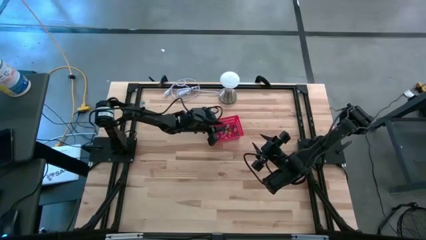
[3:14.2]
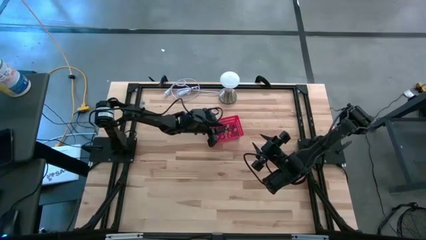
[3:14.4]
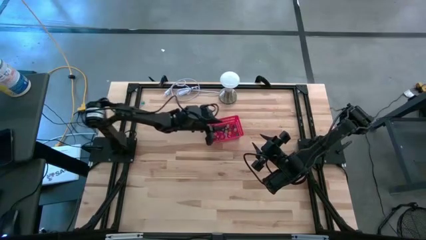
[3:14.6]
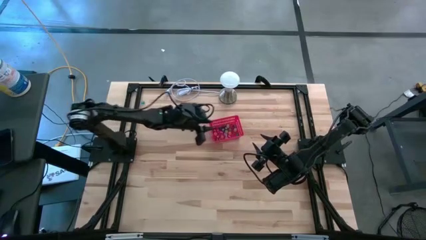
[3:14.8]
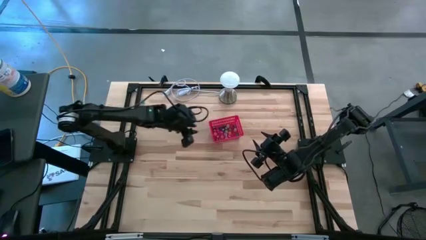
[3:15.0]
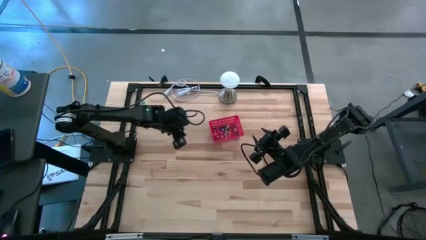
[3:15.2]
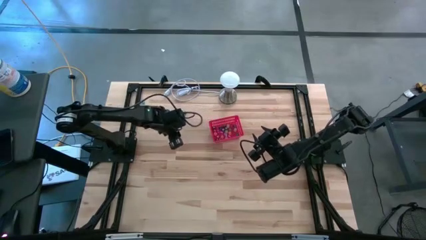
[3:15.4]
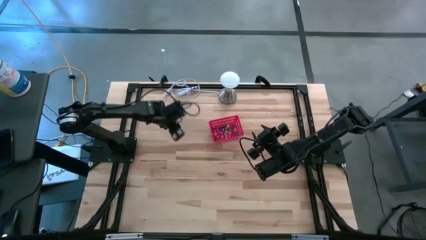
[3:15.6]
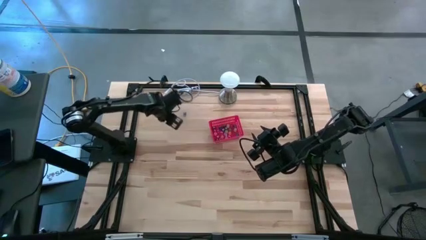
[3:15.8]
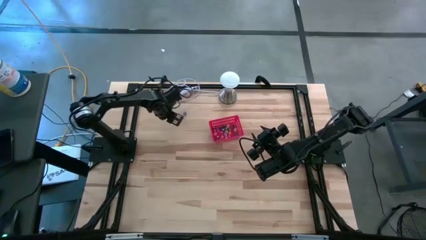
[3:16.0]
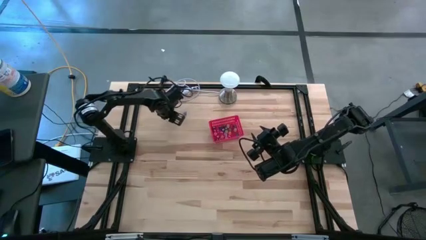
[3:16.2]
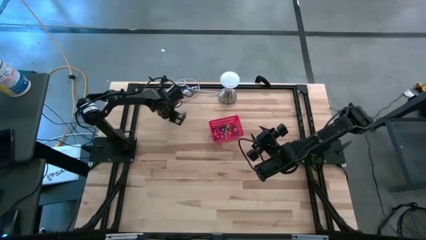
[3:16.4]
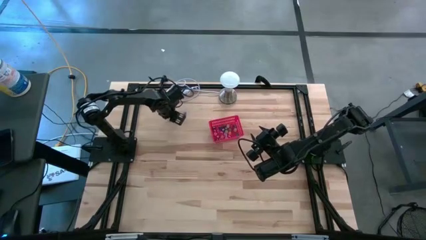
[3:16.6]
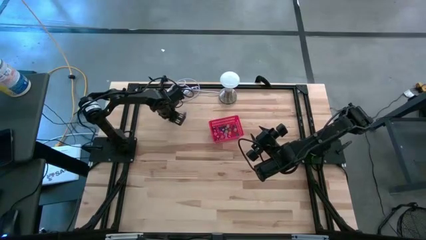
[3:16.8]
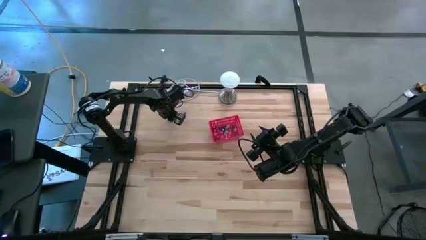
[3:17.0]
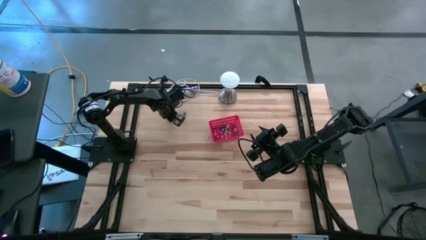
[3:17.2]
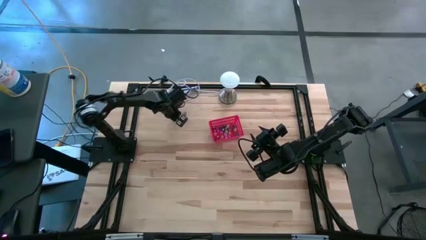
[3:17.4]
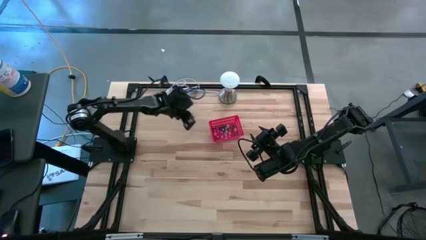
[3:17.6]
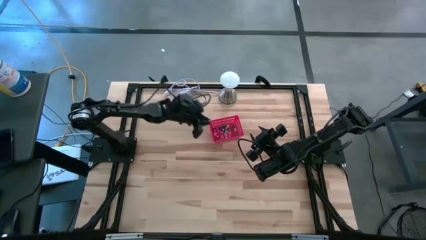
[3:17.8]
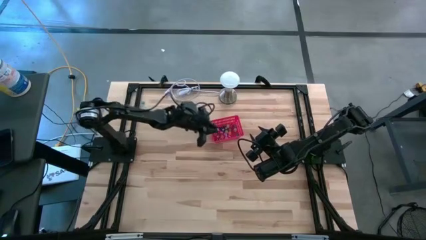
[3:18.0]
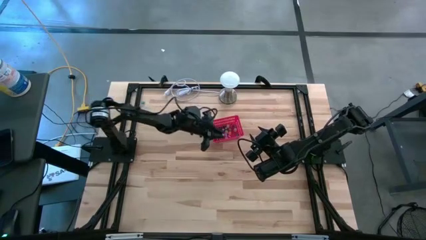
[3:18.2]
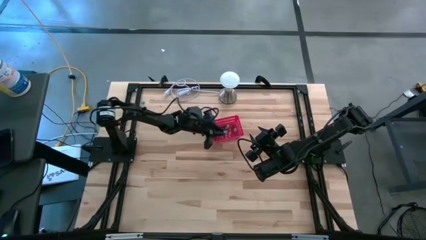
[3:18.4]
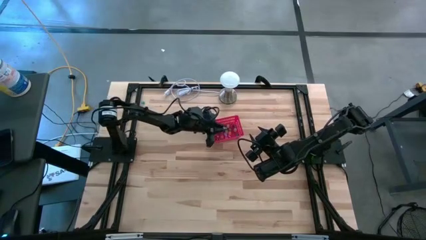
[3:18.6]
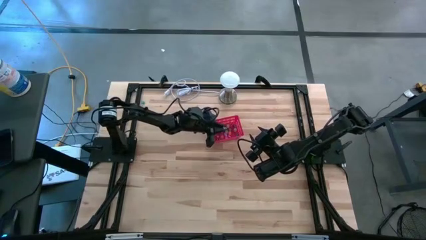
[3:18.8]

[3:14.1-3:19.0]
Task: Pick & Place Dice
Put the left blue dice into the bin

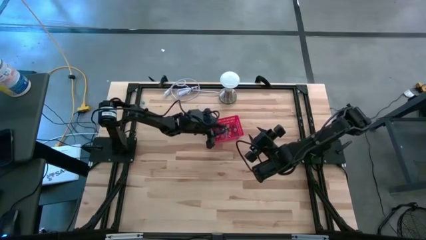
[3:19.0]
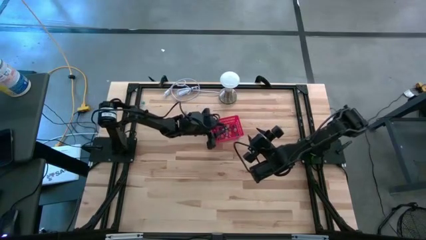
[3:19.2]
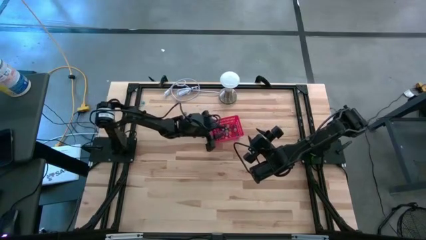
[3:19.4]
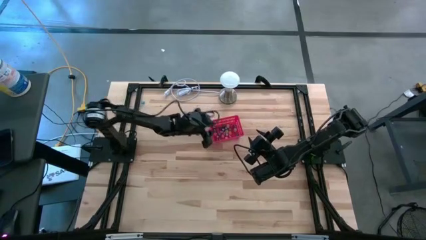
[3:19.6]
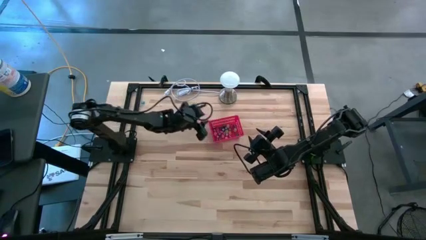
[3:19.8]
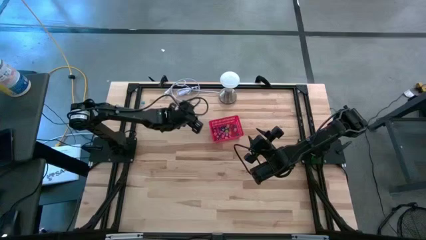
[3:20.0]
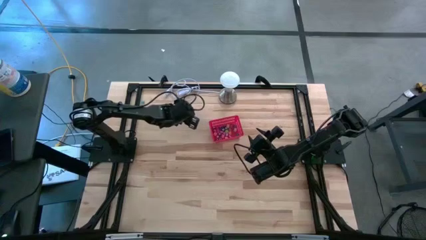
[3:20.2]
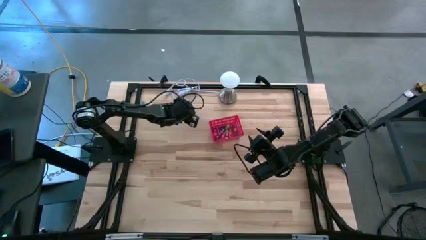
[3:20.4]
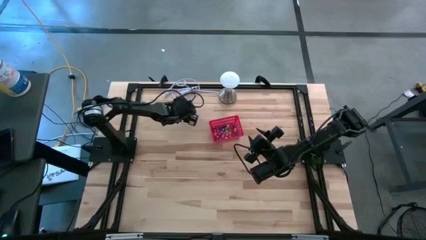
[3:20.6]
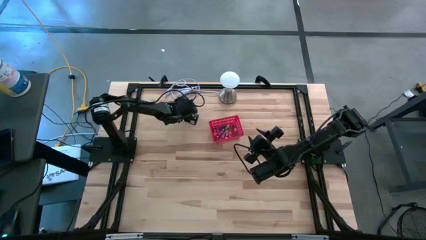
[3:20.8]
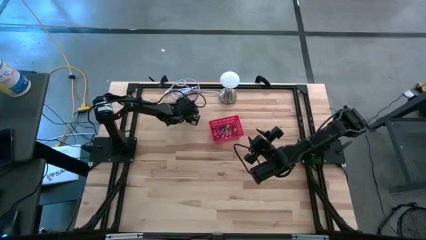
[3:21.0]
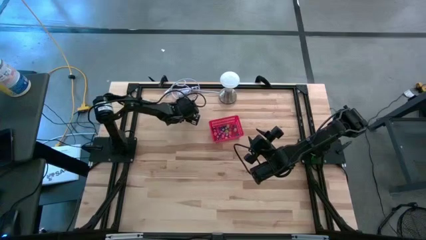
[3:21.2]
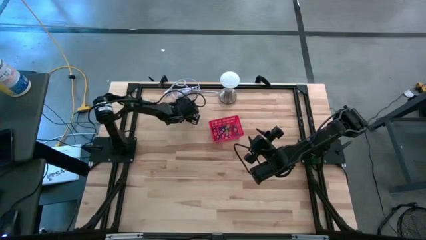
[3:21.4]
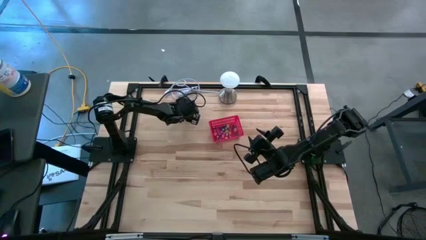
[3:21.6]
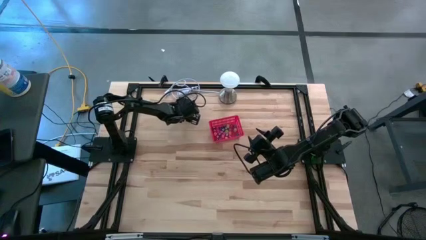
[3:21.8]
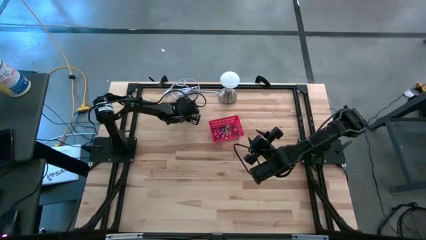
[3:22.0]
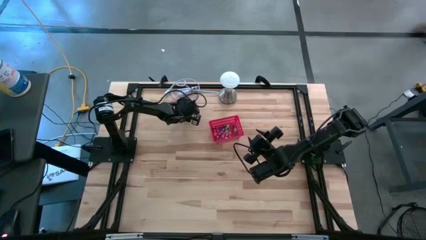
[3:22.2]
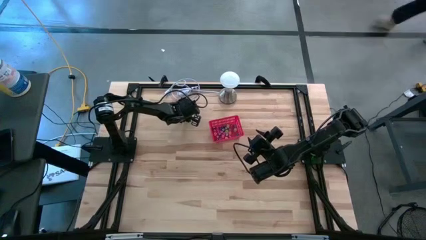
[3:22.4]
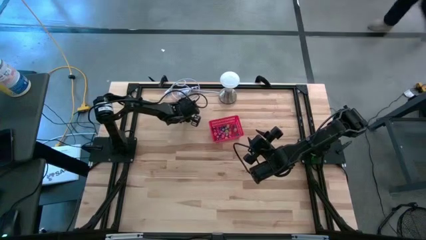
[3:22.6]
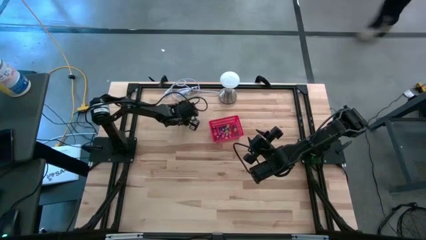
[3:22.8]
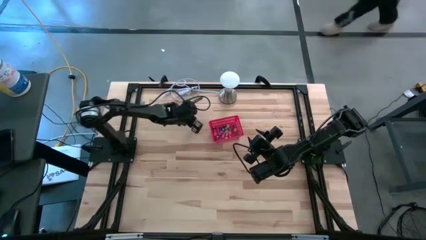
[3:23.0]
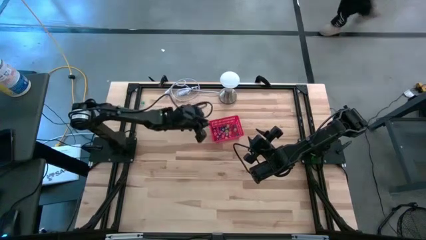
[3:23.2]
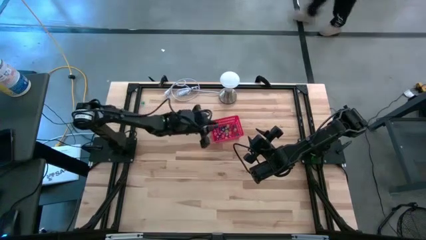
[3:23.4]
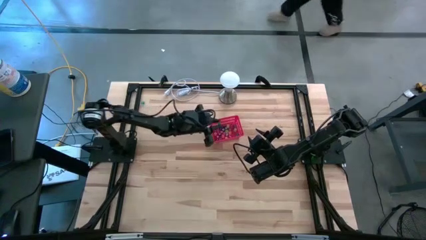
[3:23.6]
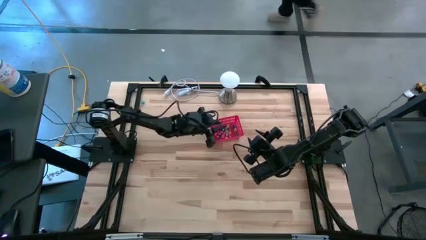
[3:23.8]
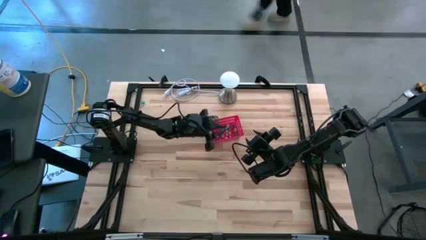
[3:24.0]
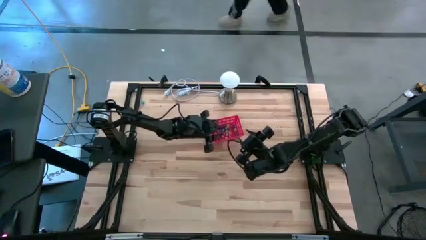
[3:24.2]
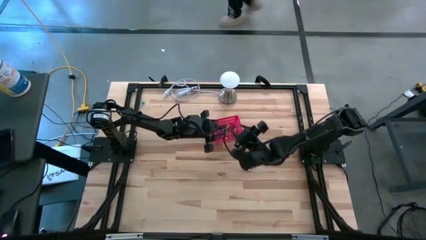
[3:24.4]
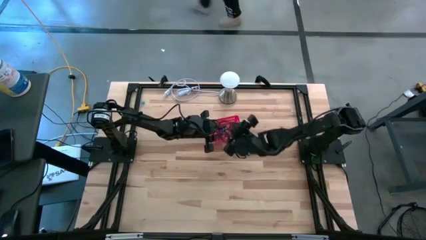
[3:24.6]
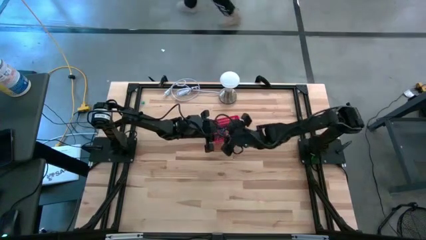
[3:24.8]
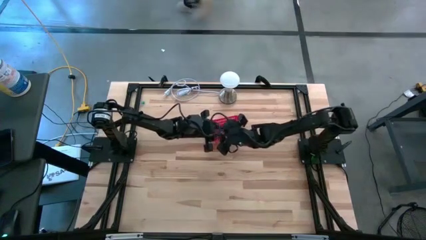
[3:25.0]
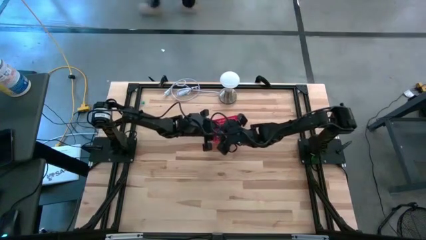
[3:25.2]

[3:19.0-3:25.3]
Put the blue dice into the bin

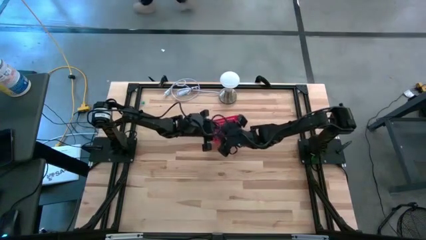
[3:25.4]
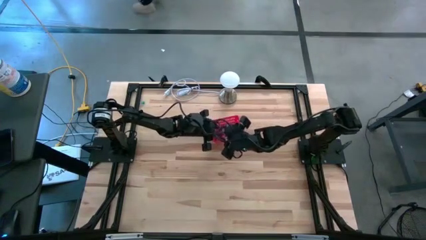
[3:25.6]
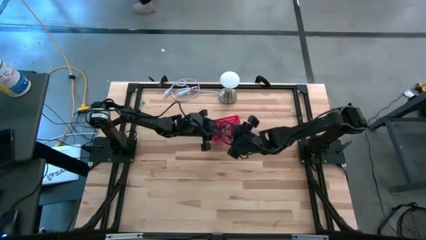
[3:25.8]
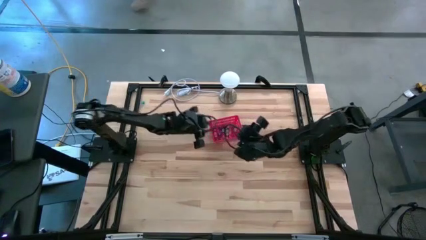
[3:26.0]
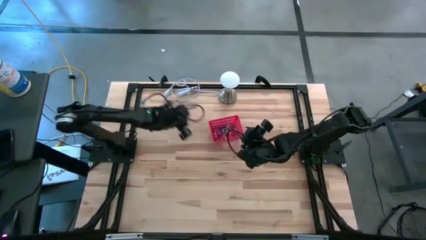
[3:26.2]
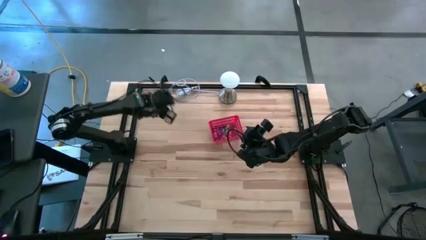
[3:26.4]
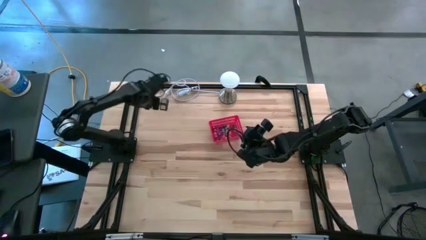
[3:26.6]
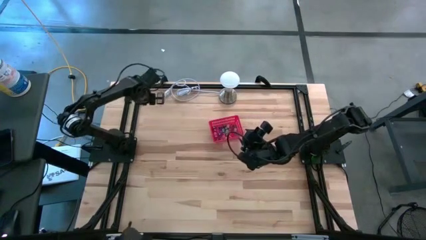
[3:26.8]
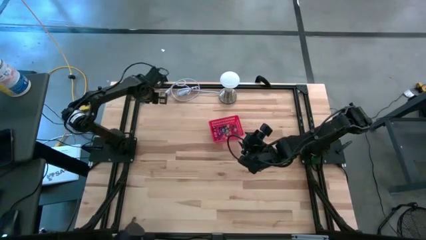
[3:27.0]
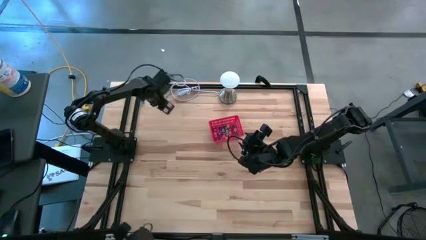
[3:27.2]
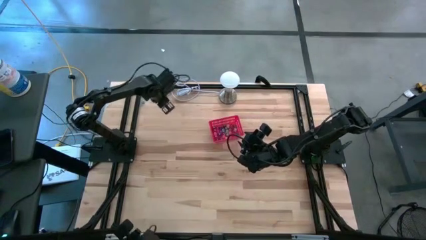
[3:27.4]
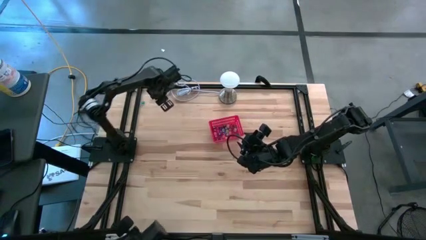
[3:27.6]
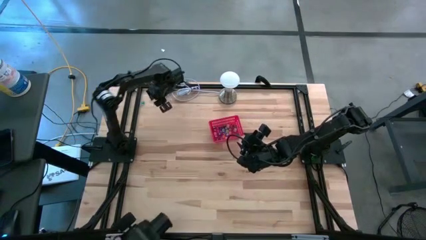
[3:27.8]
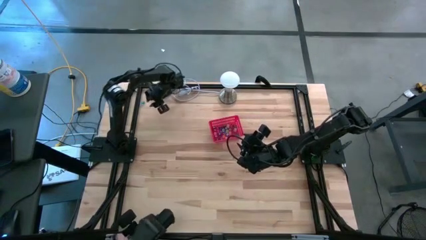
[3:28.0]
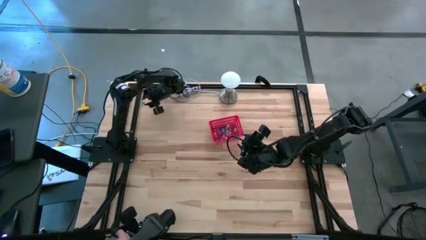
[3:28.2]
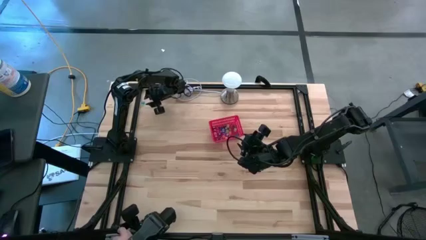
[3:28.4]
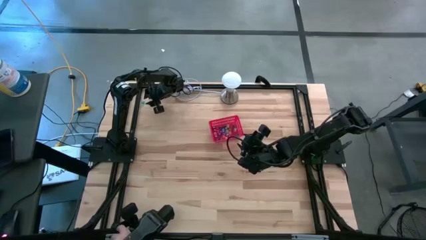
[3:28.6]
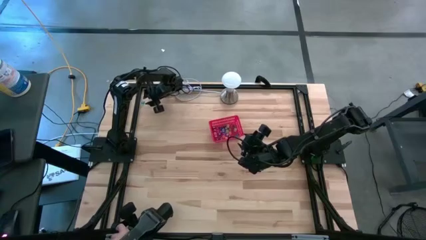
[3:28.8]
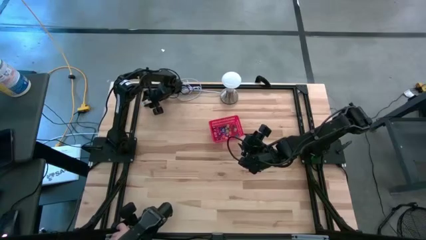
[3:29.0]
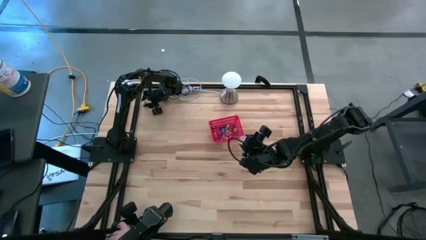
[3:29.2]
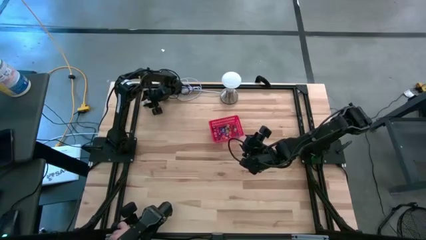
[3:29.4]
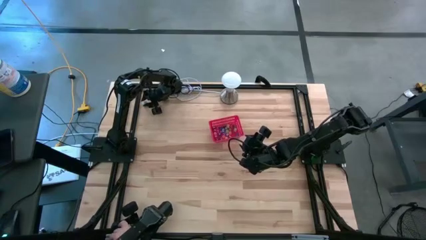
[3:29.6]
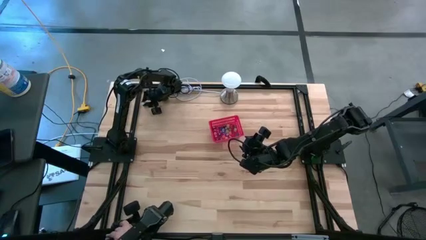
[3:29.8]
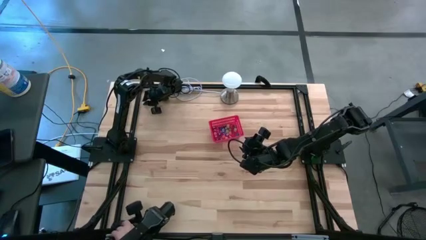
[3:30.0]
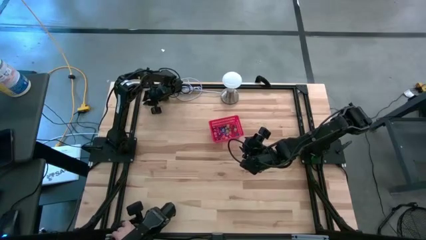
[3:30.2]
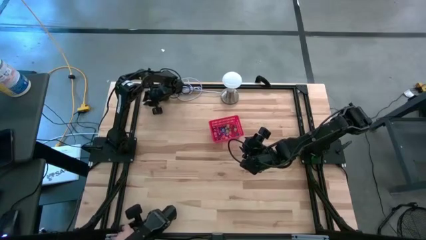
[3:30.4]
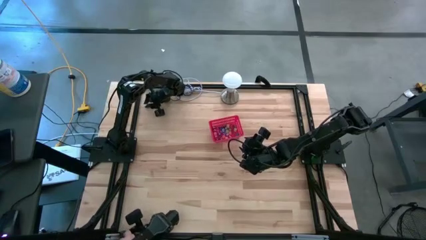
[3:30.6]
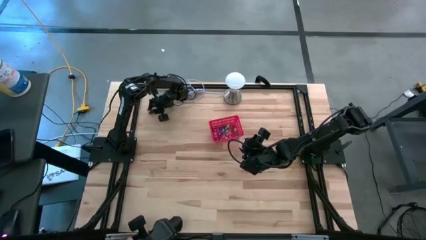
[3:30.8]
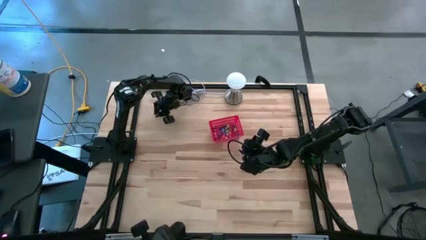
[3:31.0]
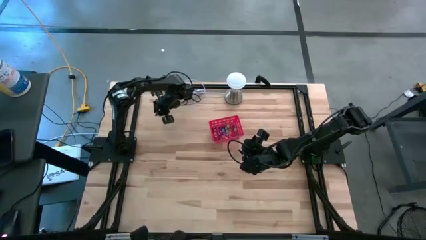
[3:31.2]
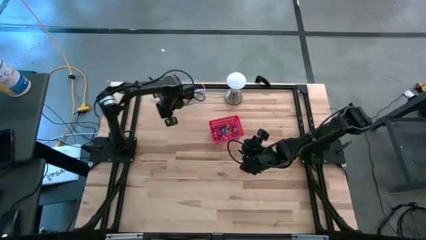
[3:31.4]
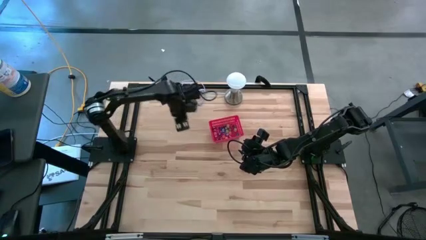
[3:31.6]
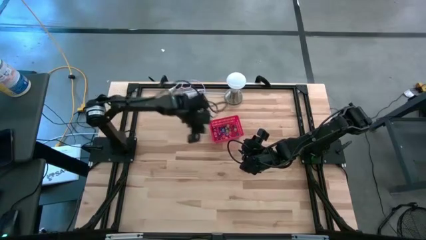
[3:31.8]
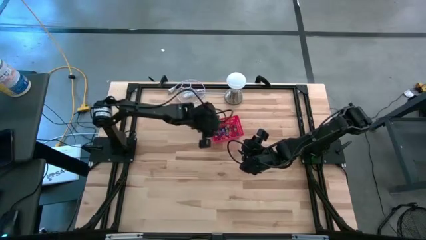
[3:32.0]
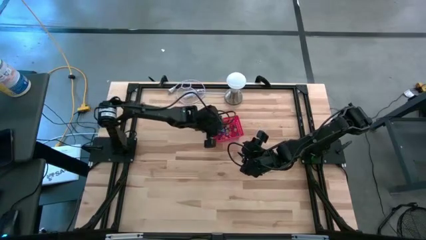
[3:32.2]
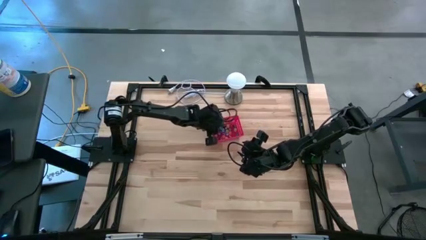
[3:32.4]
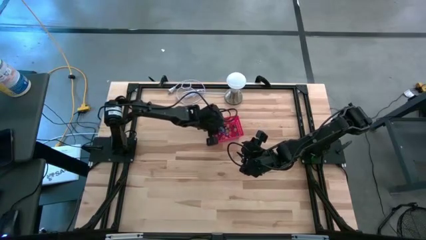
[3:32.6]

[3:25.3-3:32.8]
Put the light blue dice into the bin
